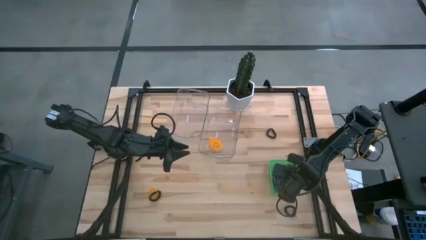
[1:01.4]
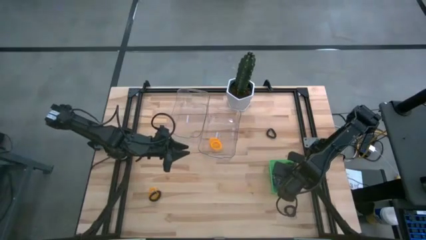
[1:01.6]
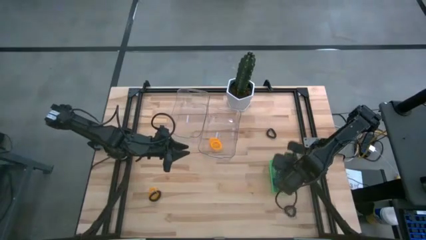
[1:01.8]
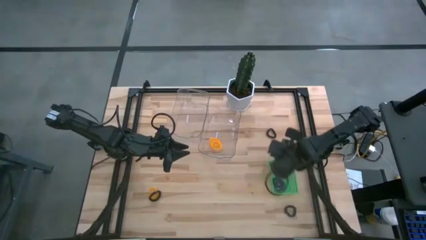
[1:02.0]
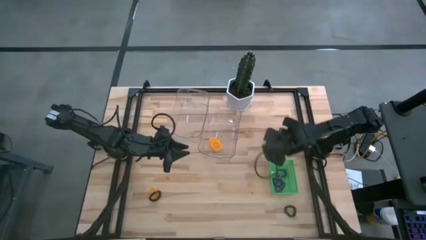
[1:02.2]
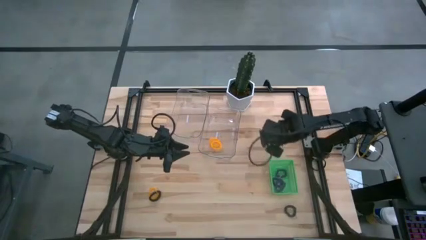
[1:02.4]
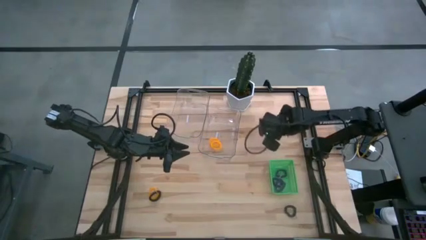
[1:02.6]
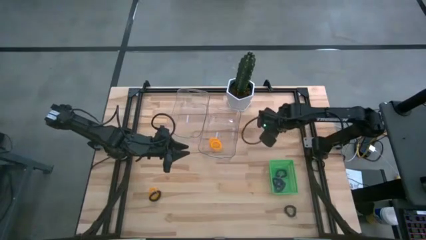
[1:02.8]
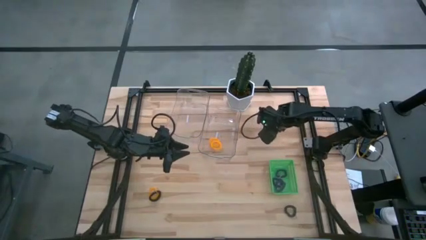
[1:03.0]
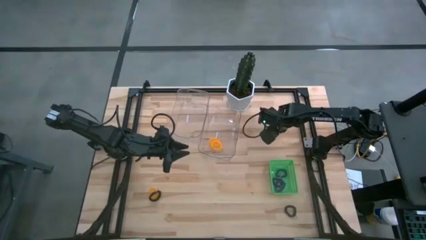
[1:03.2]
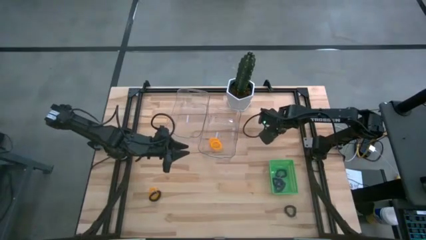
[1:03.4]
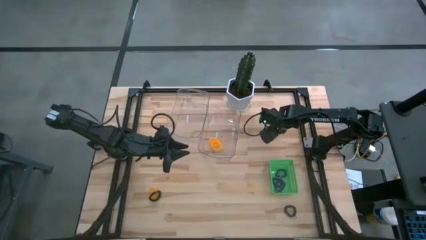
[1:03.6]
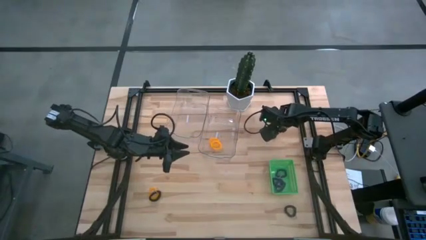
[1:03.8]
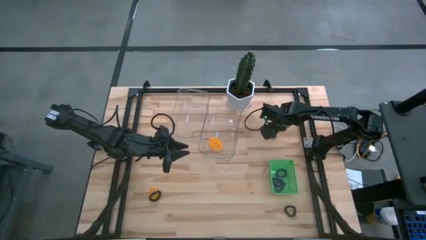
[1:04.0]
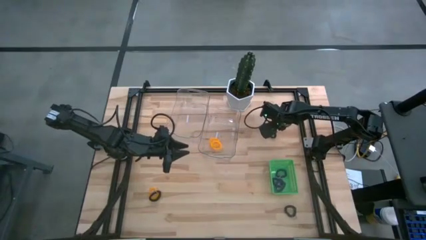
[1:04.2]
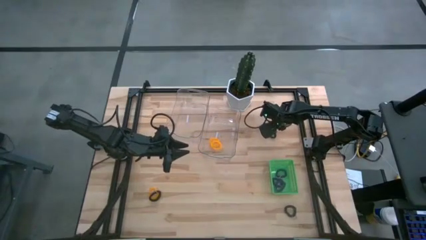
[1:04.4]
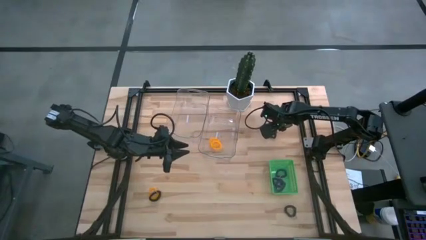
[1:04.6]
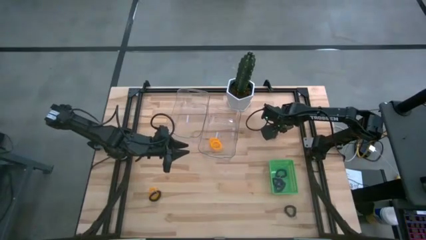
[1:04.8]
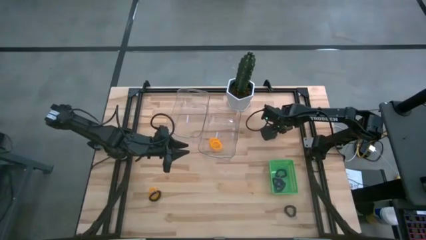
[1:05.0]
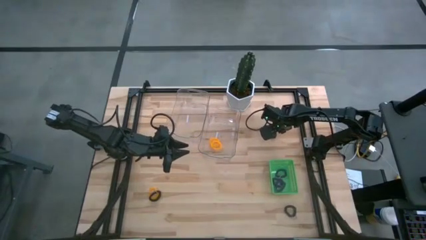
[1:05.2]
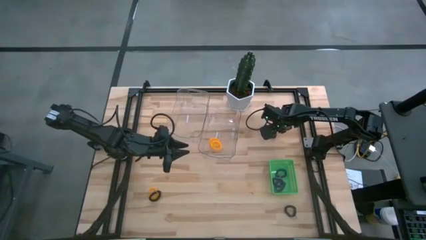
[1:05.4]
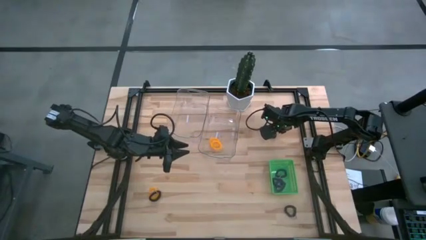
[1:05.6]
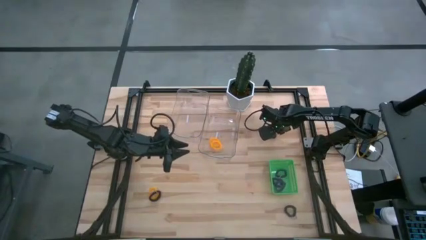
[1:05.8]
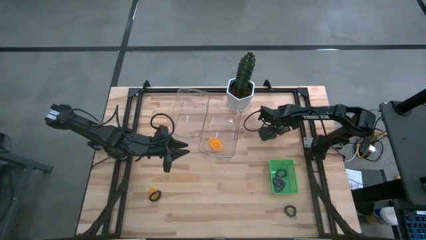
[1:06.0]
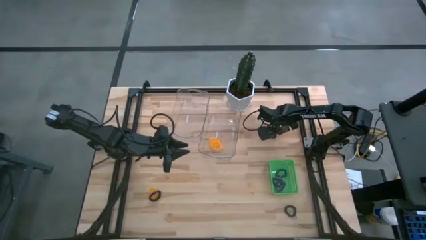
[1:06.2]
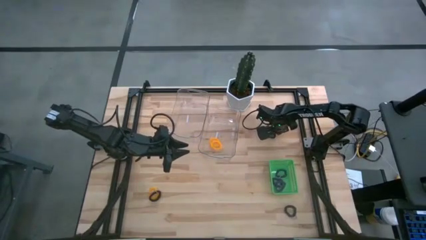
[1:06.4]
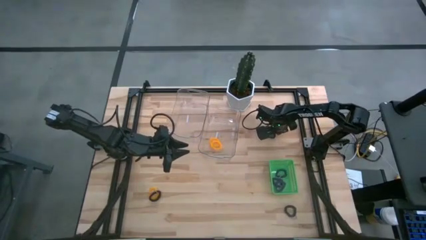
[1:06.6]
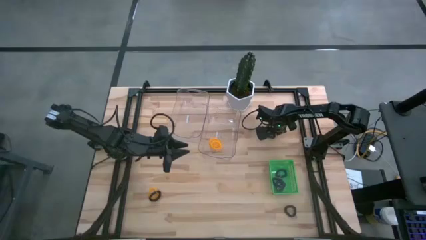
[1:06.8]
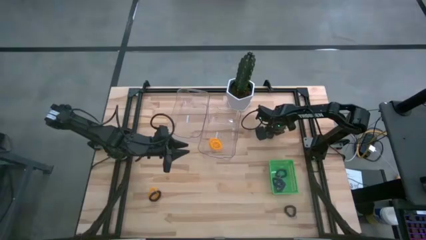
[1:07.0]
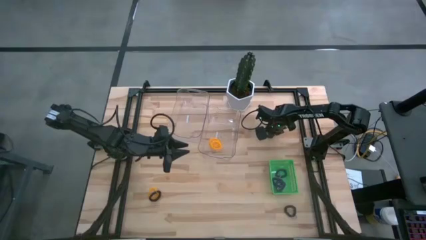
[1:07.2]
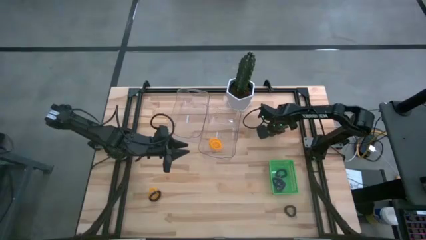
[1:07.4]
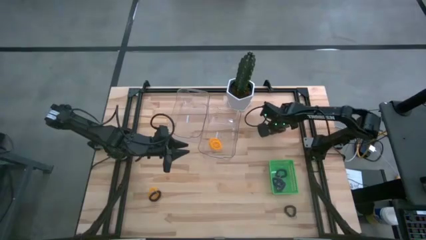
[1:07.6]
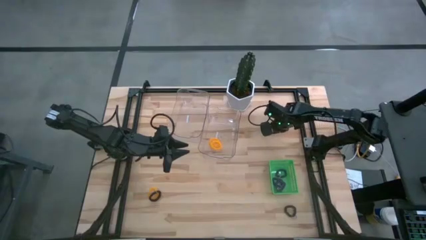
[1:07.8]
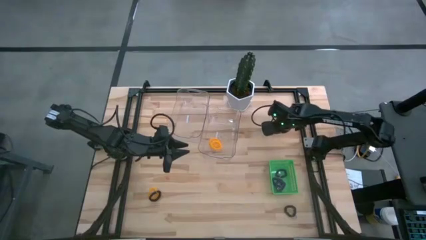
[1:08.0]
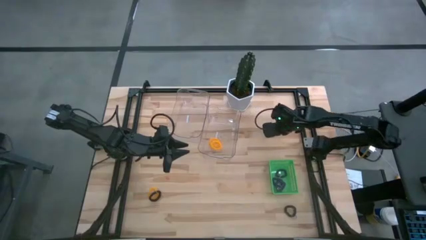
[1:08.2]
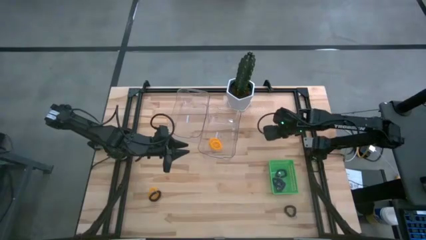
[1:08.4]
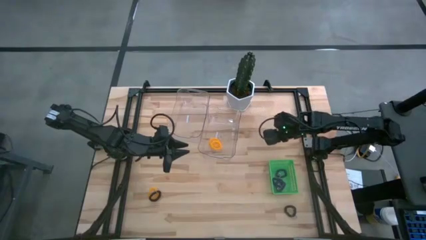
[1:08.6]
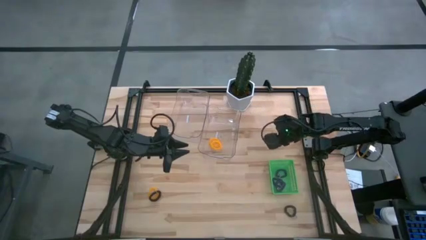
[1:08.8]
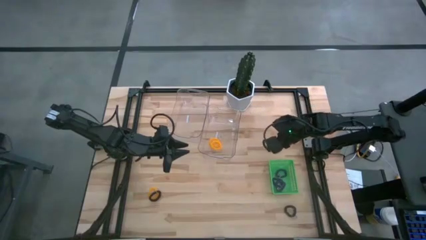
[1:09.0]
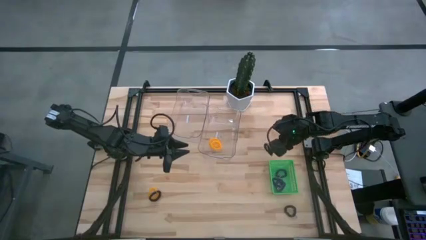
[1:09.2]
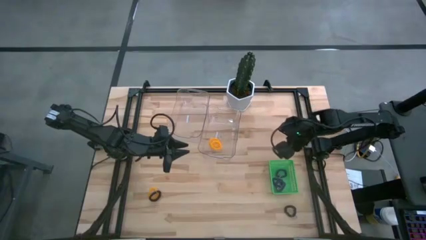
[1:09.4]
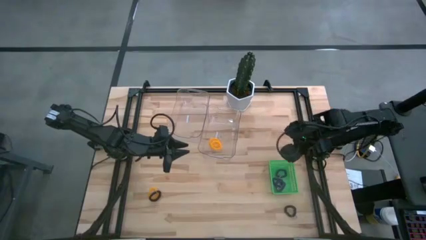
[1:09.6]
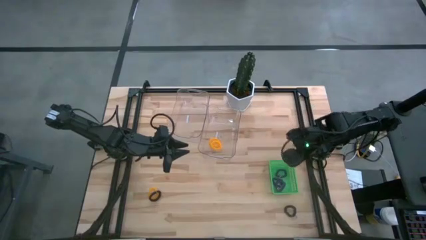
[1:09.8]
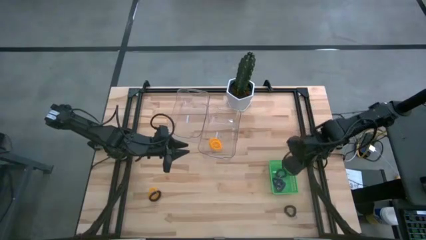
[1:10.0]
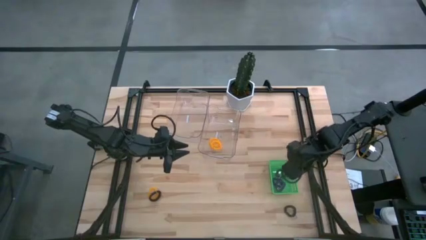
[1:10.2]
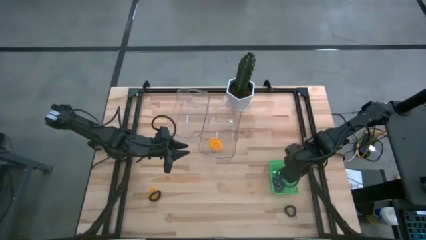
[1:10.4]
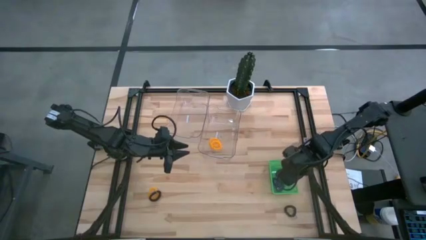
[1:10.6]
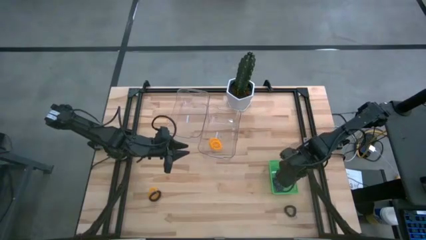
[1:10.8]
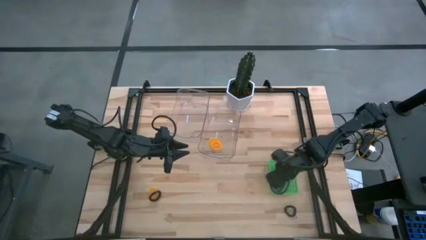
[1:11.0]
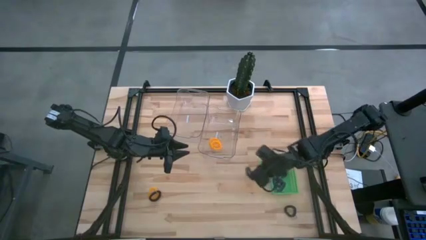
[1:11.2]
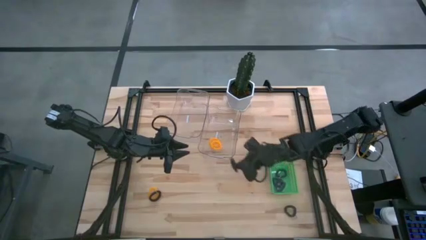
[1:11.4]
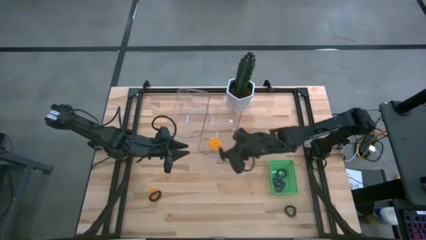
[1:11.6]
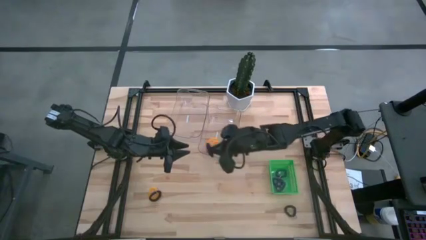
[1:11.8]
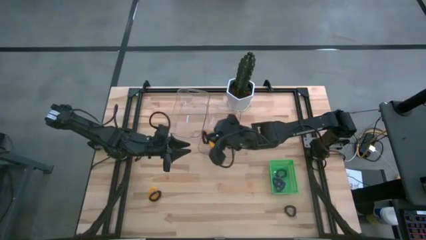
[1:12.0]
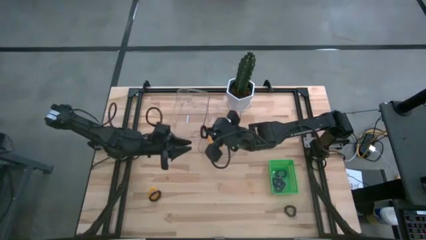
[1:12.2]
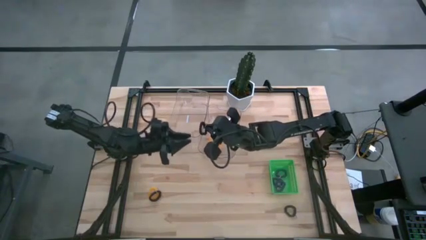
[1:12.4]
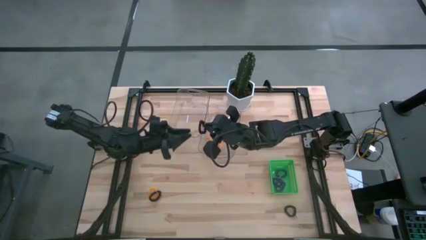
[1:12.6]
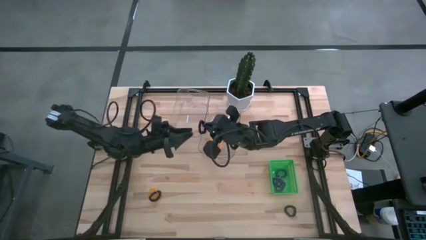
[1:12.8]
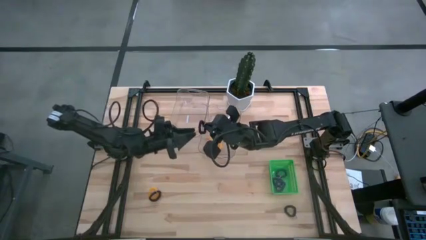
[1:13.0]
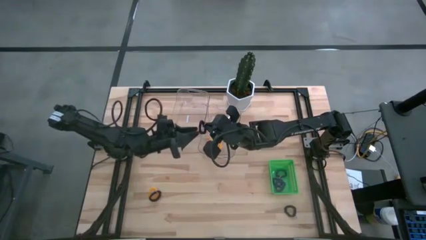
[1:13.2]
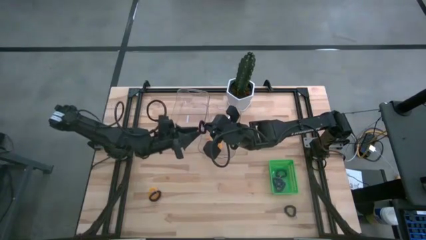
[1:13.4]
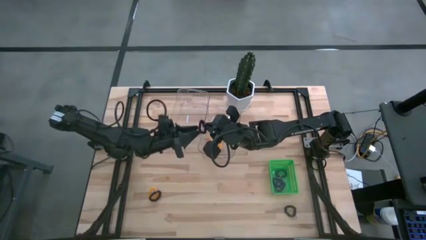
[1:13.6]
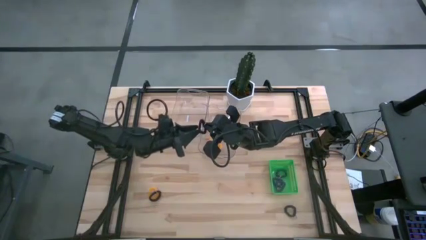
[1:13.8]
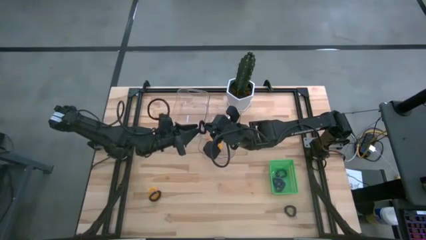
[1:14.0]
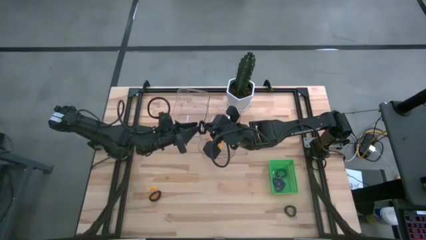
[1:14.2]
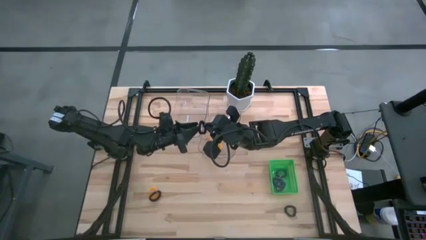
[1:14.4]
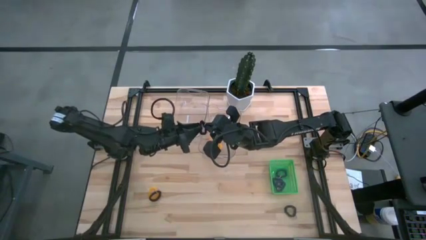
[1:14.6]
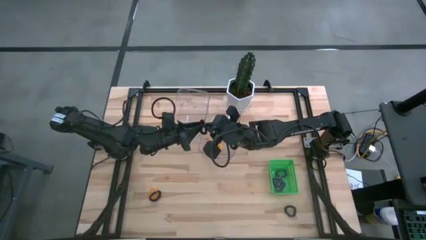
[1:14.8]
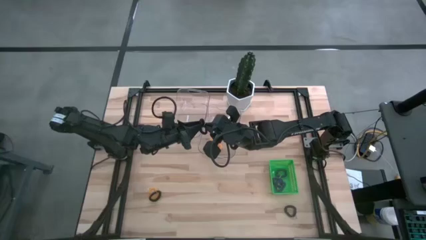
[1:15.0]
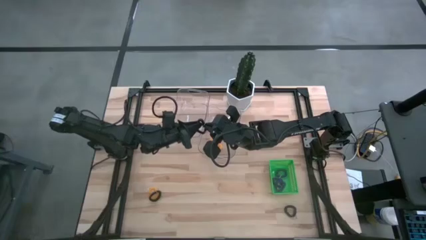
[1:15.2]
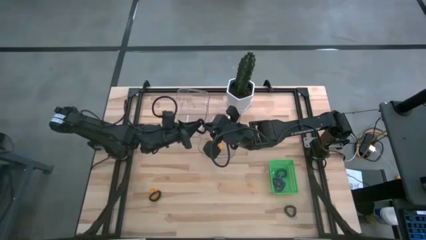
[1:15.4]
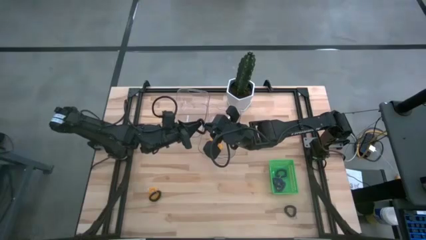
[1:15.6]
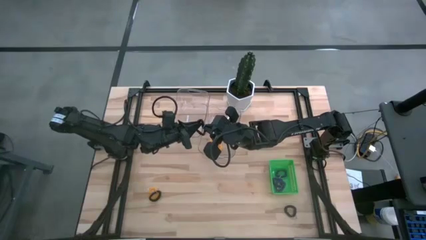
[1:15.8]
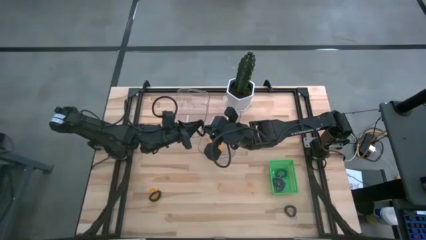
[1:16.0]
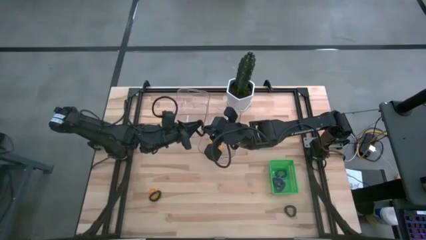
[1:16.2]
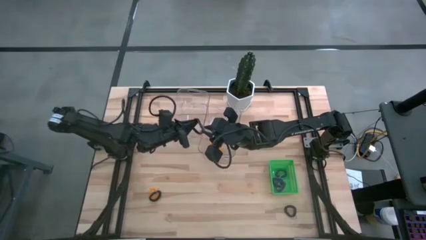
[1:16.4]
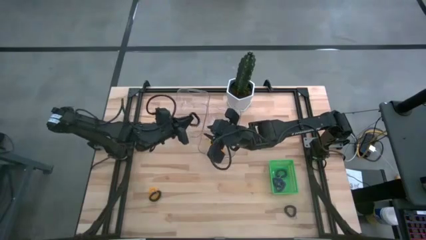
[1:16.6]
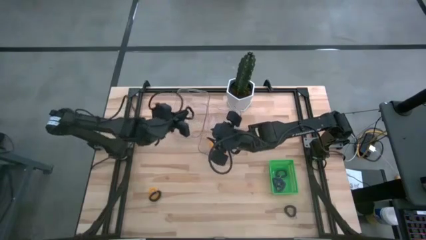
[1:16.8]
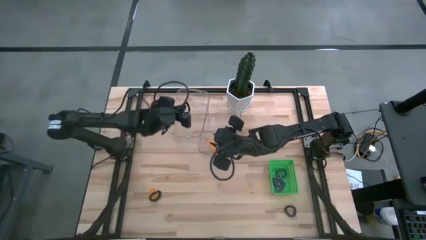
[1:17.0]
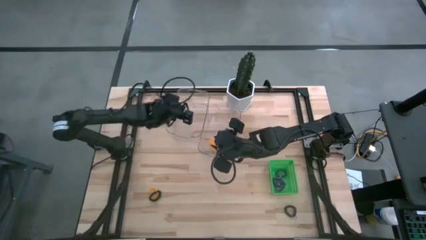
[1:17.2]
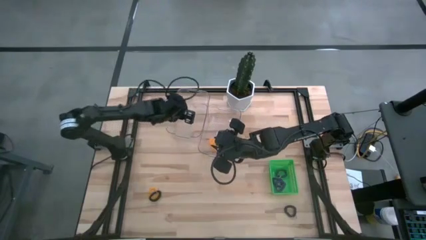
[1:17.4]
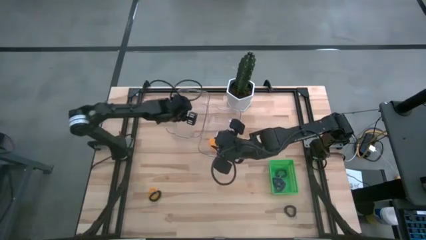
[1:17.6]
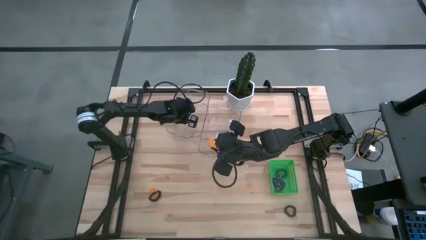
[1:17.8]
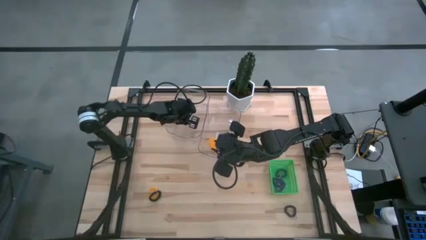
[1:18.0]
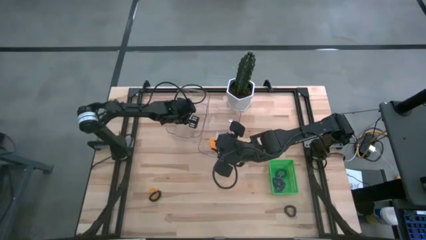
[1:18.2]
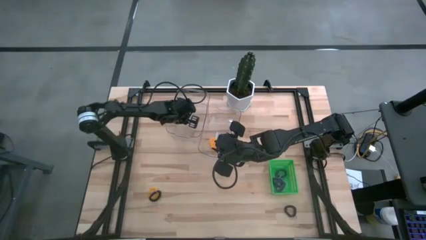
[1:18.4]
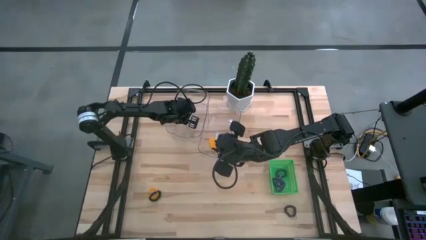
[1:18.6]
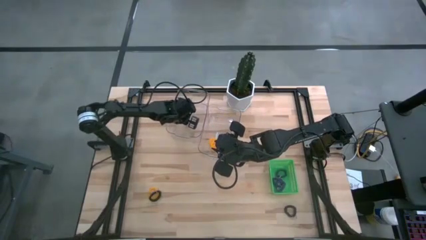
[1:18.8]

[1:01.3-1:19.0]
Task: Sort spring keychains
Put the top black spring keychain into the left transparent bin
